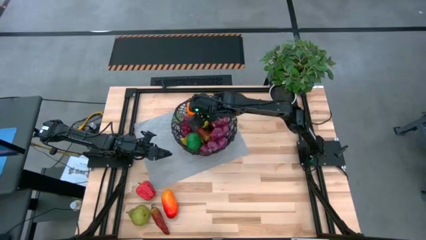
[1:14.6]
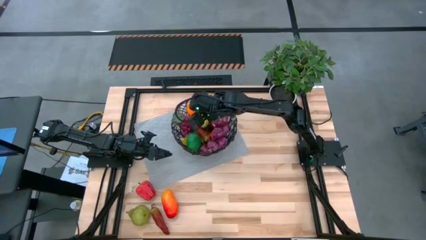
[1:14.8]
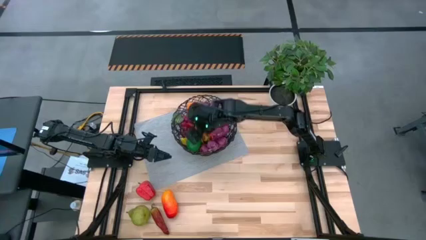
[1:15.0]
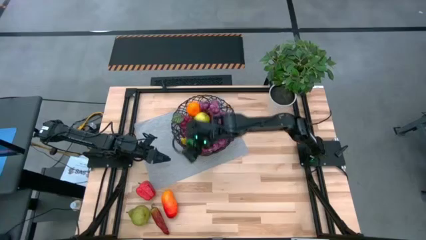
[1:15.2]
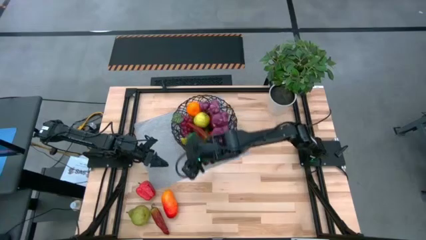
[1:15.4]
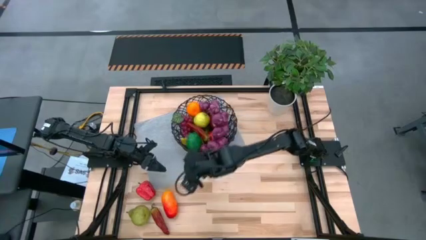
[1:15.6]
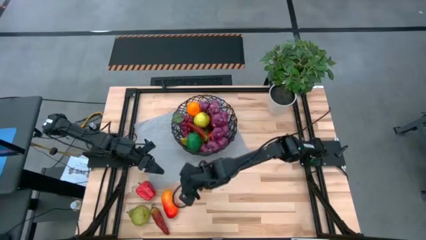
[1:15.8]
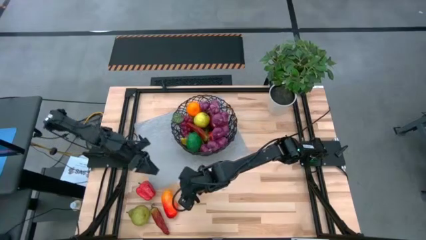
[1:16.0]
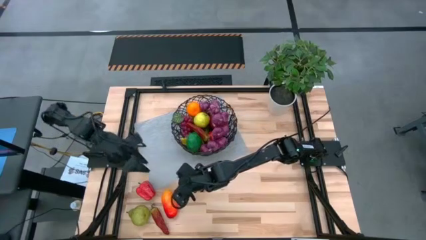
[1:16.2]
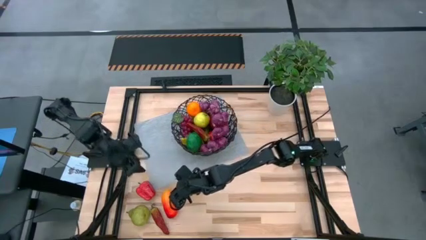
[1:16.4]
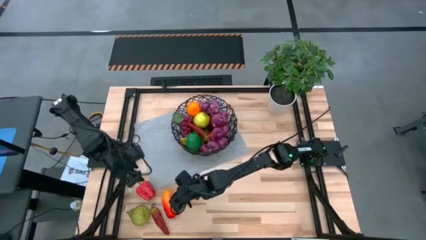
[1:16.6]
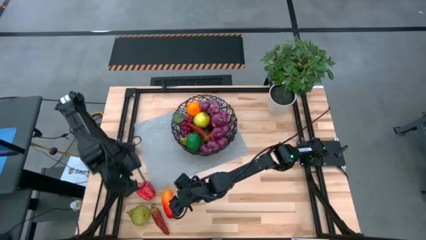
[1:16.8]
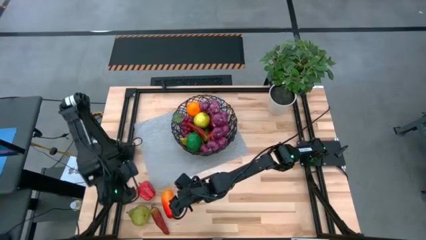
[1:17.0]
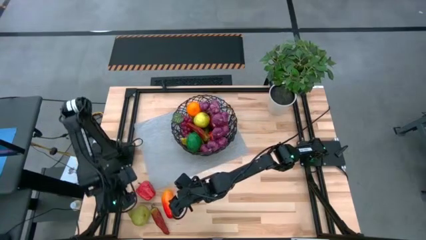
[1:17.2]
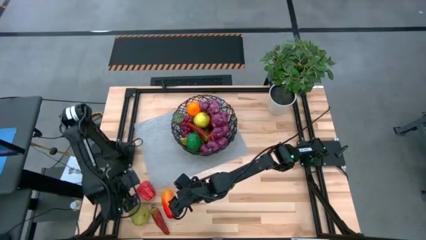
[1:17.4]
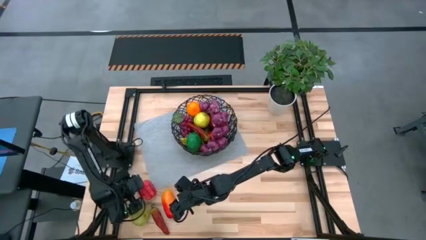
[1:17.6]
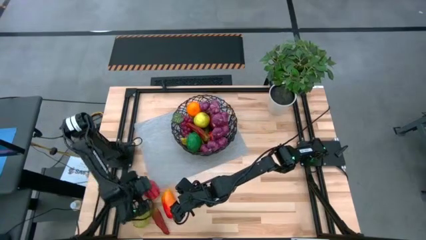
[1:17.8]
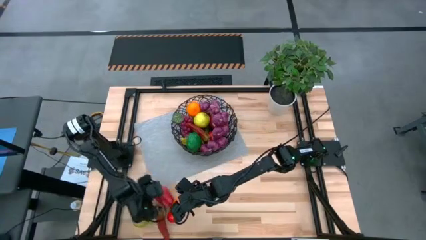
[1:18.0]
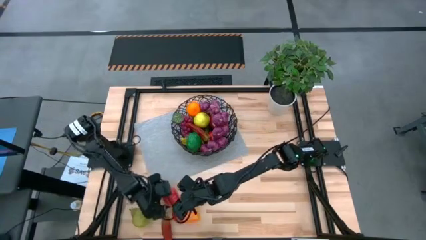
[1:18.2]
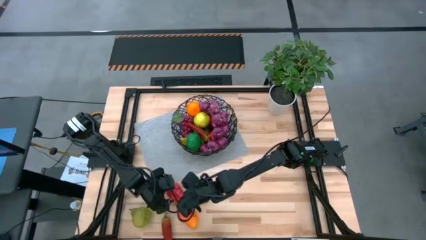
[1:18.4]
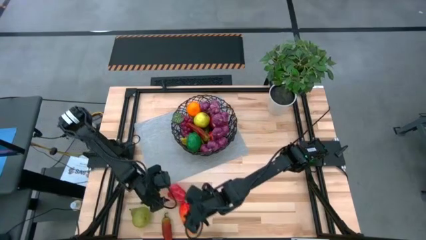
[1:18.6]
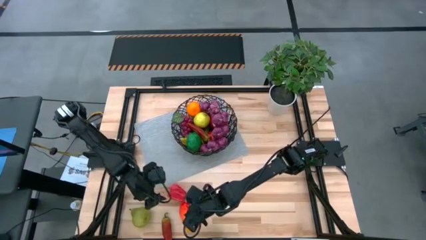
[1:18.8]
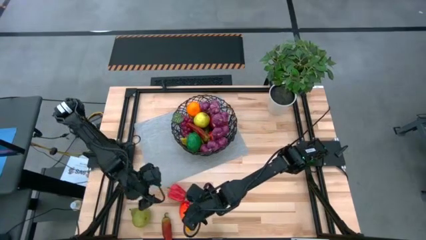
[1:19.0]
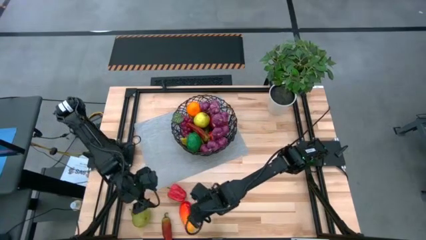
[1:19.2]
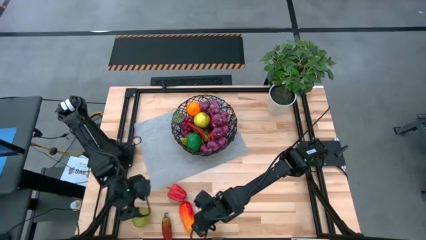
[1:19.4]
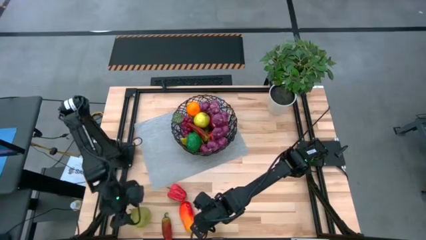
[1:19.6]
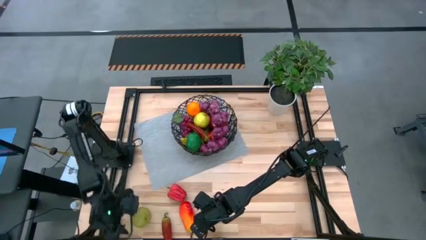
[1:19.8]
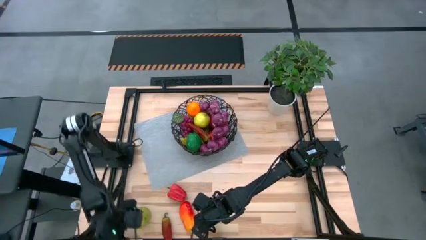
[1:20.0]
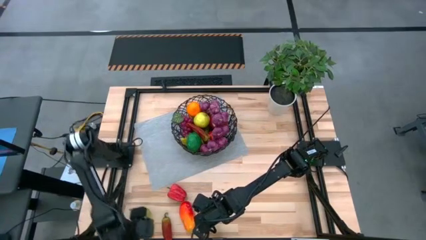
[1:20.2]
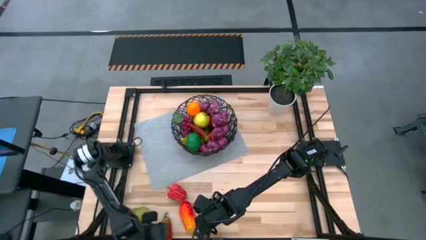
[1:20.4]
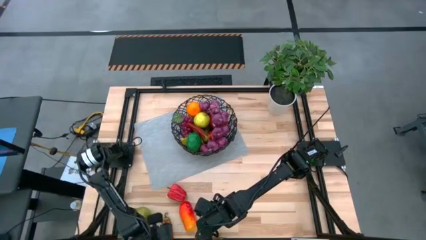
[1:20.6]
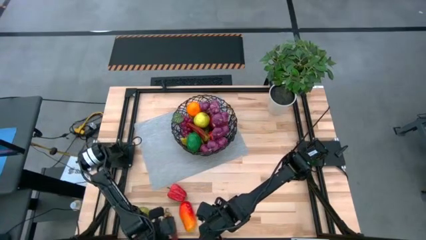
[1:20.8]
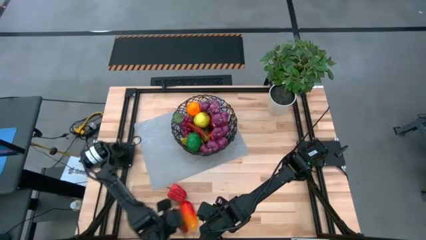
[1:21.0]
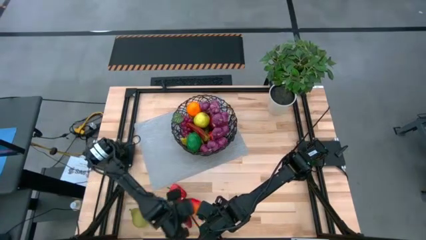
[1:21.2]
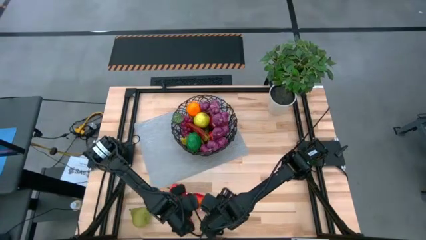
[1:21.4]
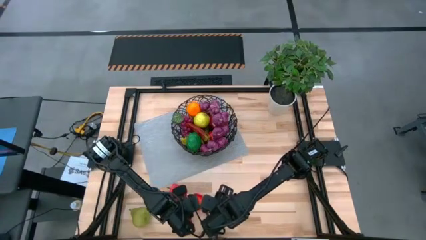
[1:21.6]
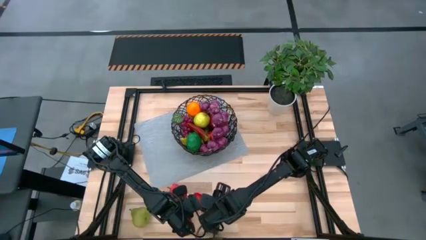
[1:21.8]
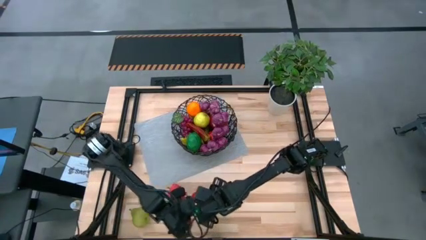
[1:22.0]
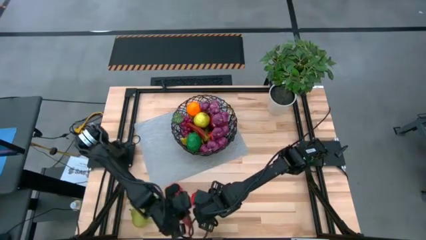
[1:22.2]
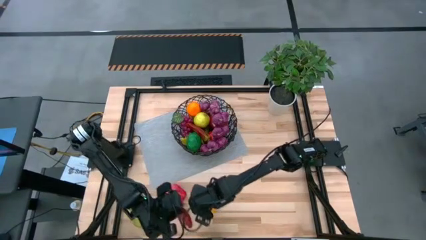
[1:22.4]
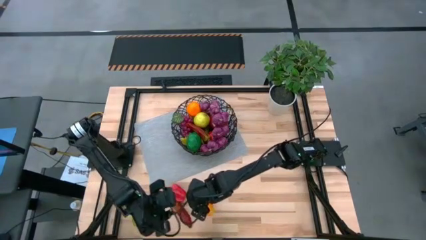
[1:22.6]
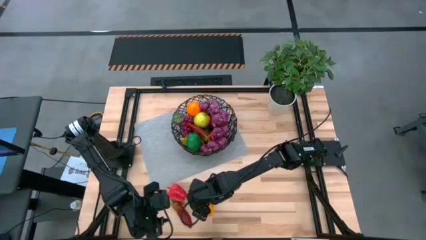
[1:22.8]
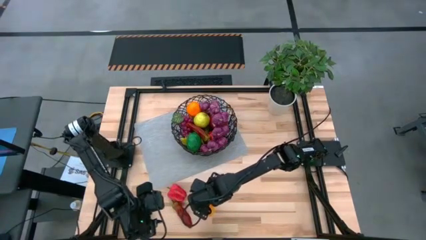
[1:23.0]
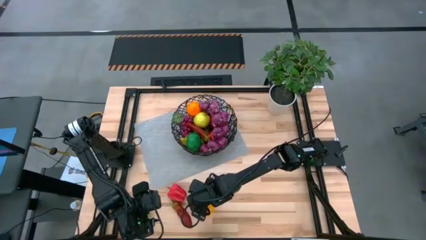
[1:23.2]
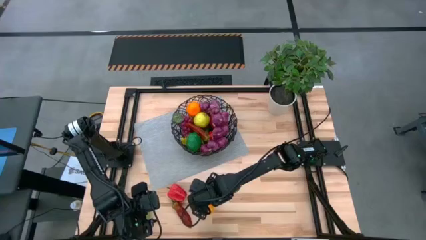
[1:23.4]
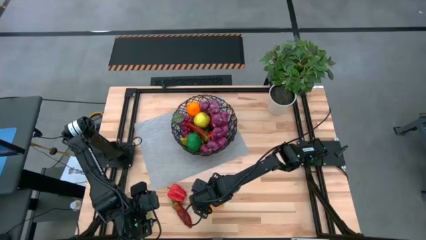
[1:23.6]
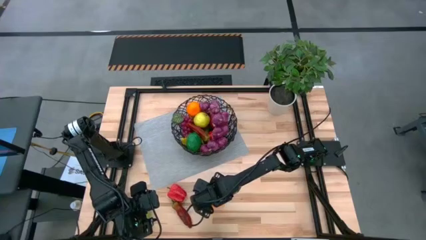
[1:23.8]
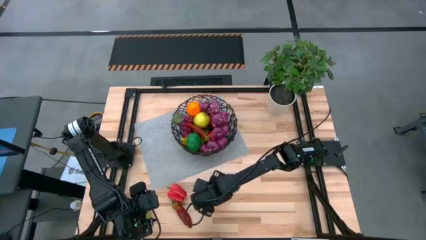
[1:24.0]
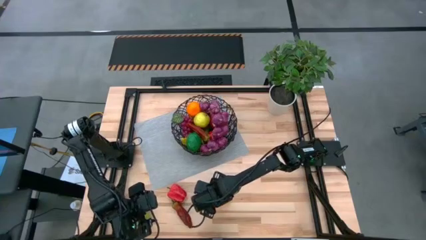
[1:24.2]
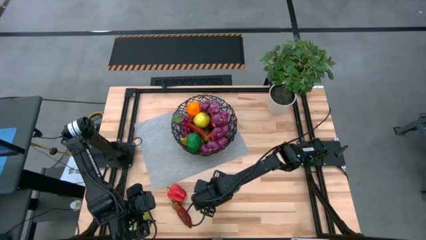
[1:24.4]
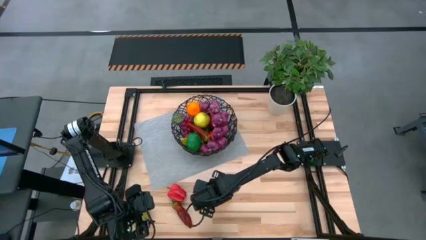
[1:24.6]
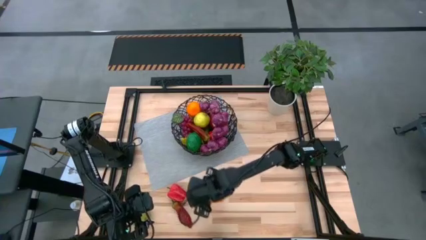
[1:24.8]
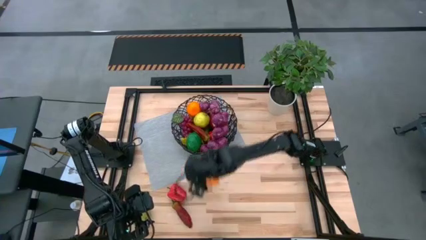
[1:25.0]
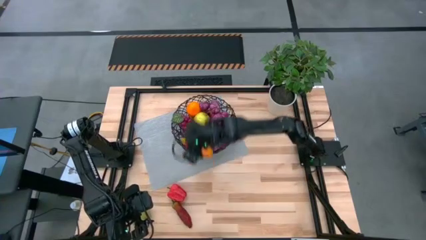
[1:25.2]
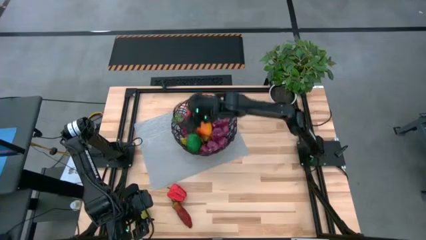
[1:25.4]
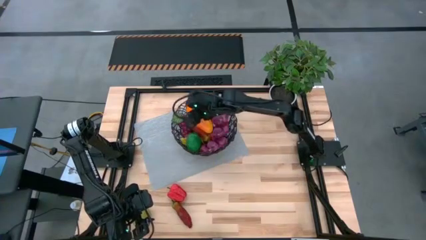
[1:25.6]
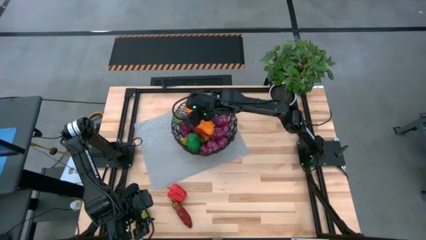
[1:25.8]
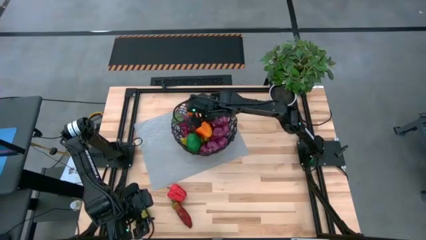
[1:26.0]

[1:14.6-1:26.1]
Task: Build produce basket
Put the red mango into the wired basket

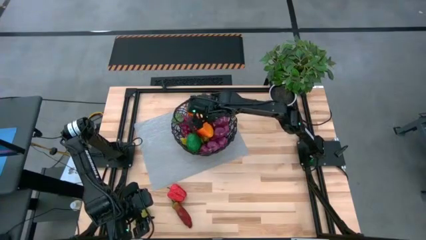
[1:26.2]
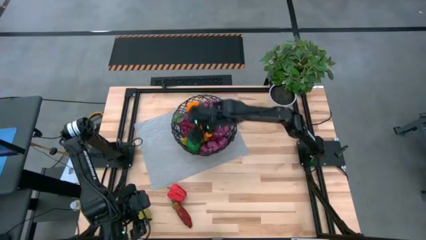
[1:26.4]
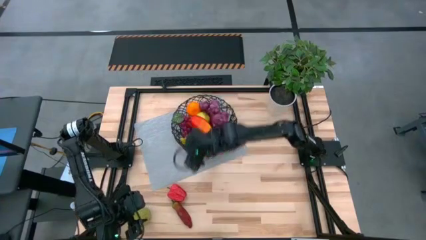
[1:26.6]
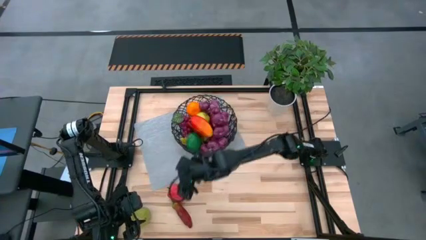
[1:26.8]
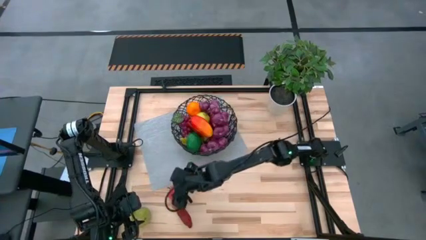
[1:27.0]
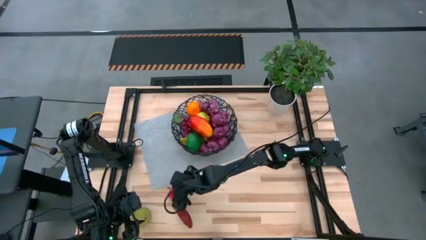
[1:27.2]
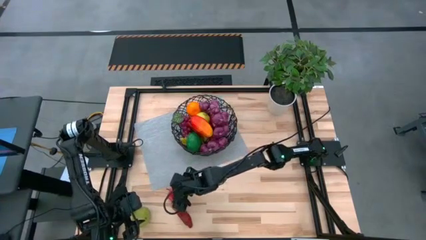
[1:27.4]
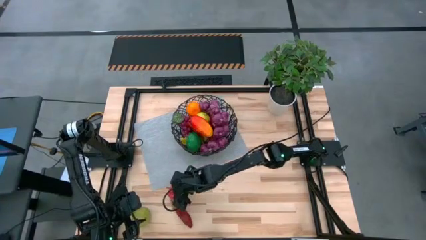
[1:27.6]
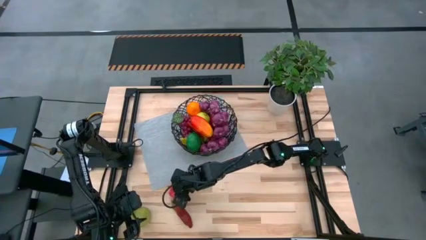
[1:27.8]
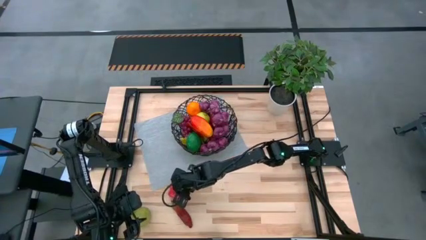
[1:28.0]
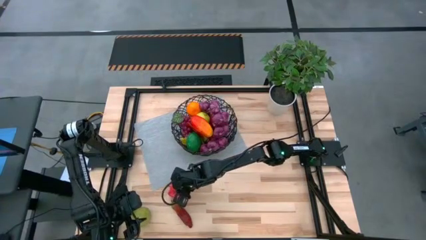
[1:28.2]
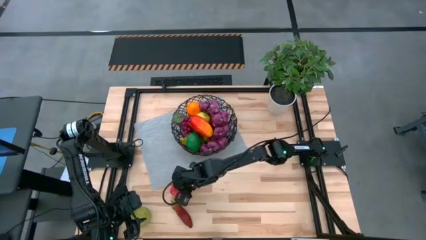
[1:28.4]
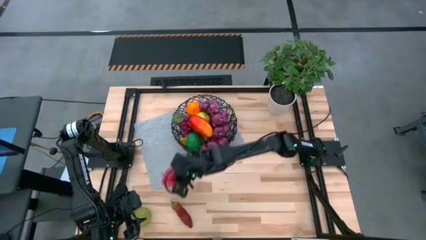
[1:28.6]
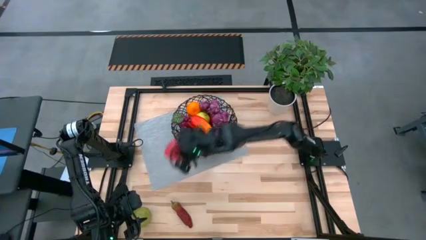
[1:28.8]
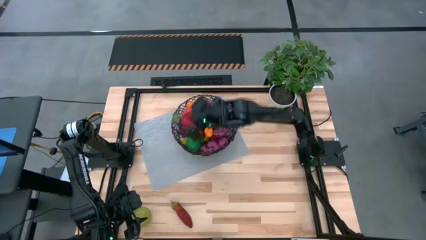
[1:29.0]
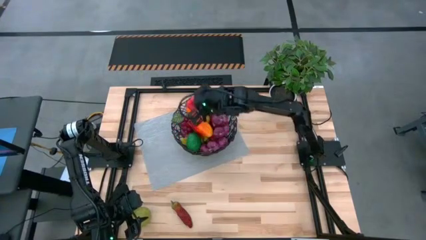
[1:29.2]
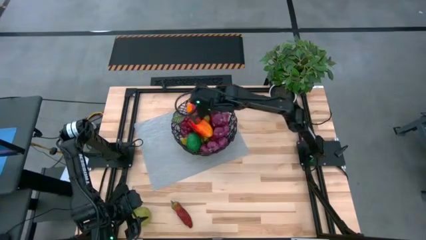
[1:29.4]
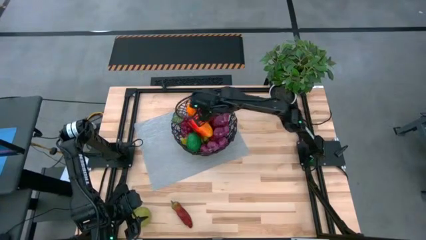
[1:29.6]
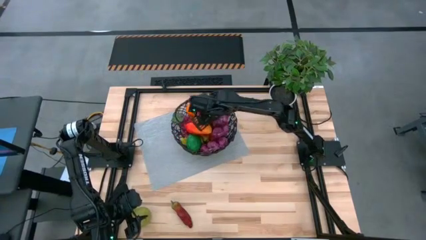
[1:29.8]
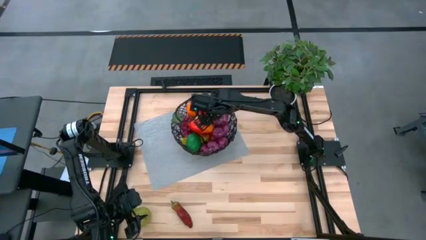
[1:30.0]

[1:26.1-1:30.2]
Put the red bell pepper into the wired basket

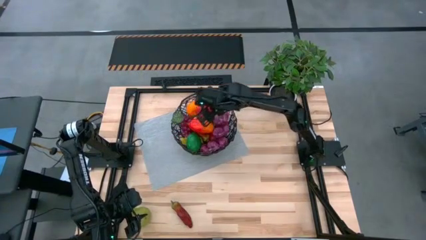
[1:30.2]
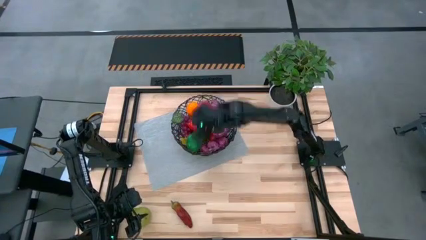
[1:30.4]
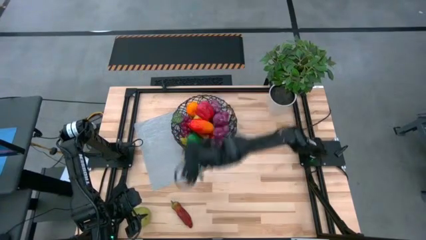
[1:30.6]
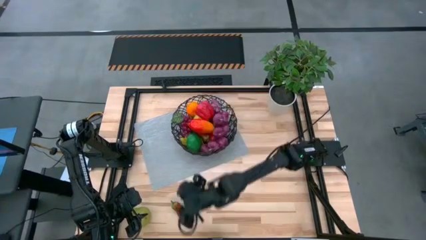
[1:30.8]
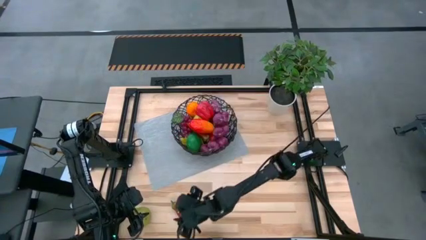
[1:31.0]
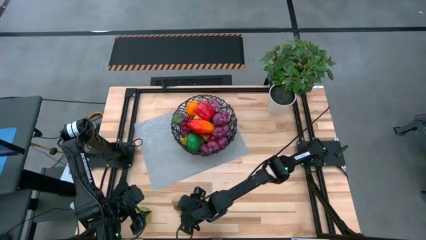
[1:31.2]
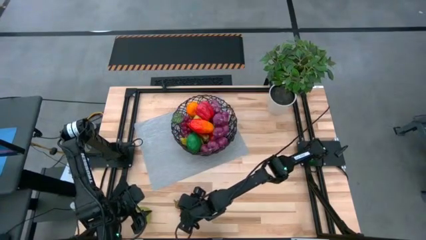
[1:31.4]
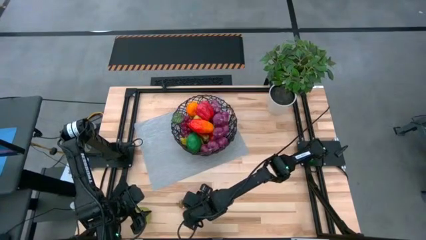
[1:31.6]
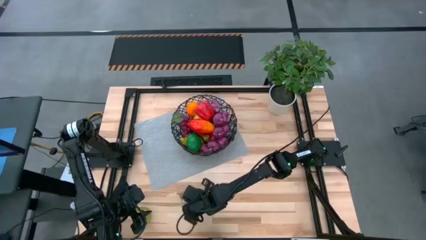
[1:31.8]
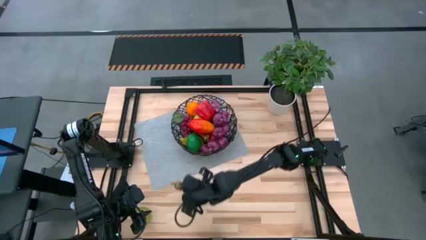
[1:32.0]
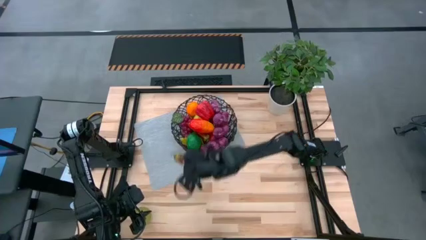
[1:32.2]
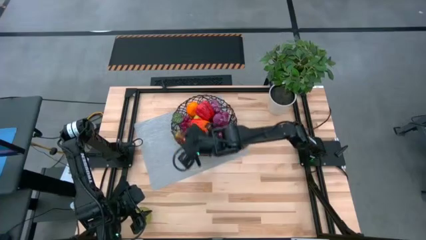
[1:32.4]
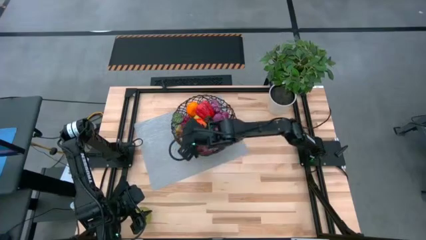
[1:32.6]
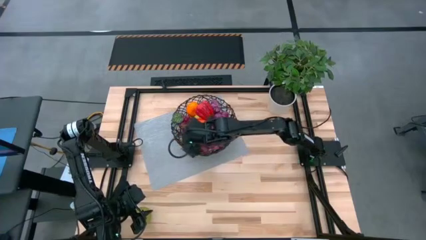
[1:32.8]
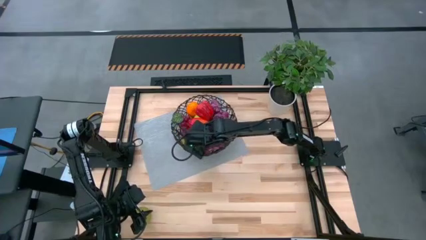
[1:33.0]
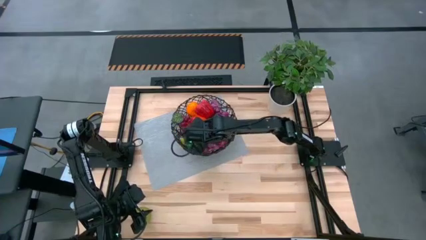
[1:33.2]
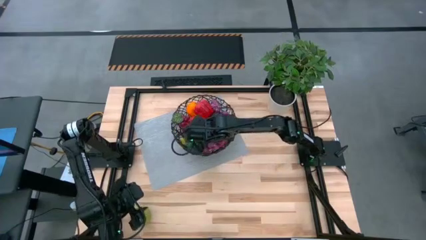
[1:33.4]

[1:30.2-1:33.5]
Put the chili pepper into the wire basket
